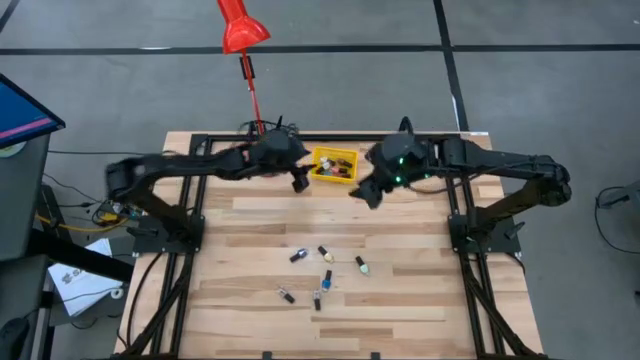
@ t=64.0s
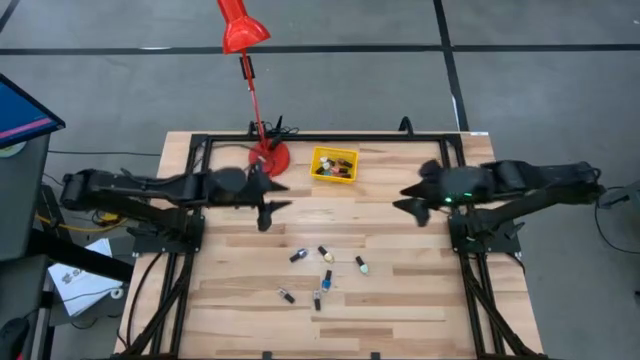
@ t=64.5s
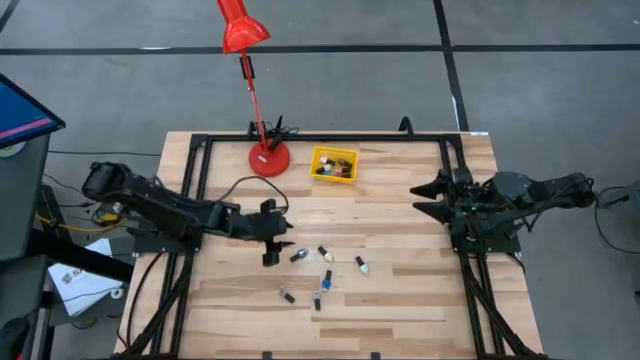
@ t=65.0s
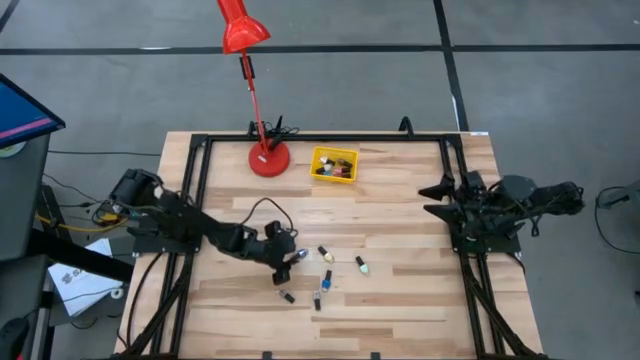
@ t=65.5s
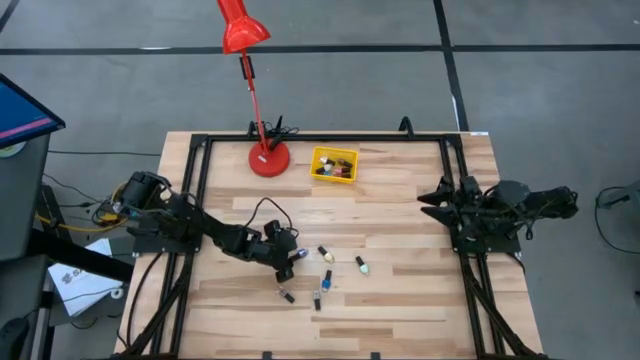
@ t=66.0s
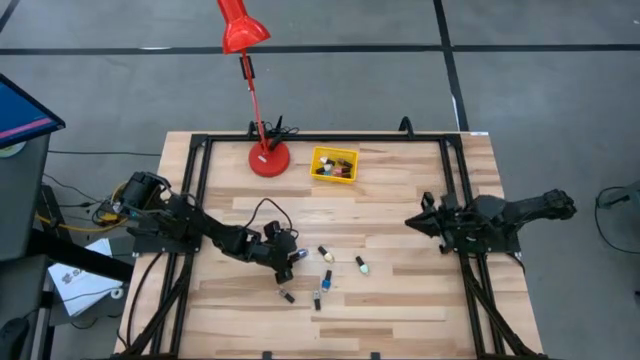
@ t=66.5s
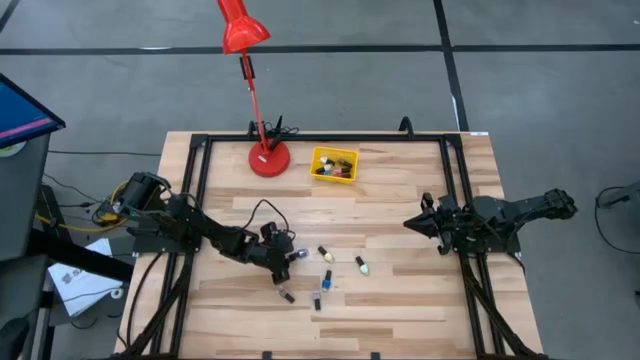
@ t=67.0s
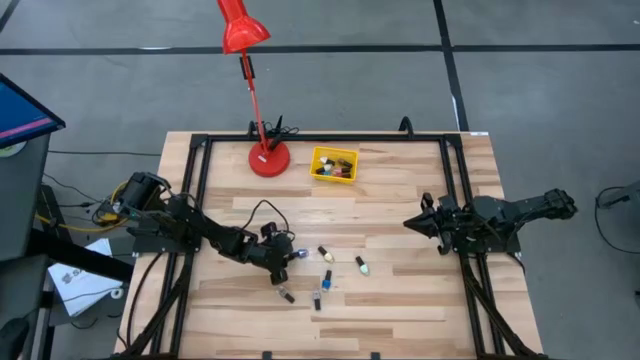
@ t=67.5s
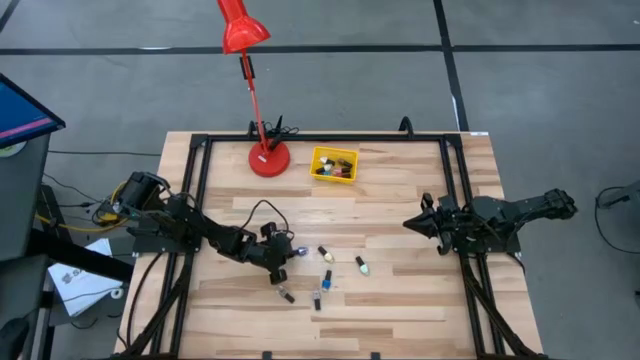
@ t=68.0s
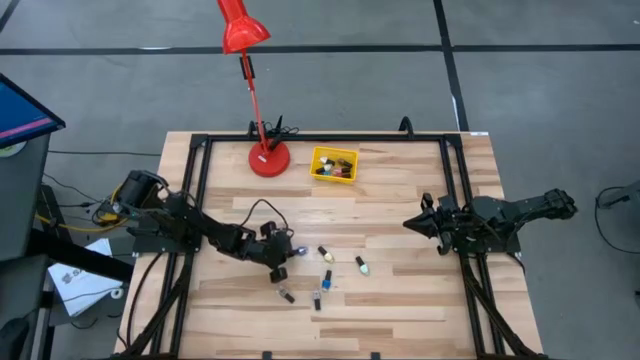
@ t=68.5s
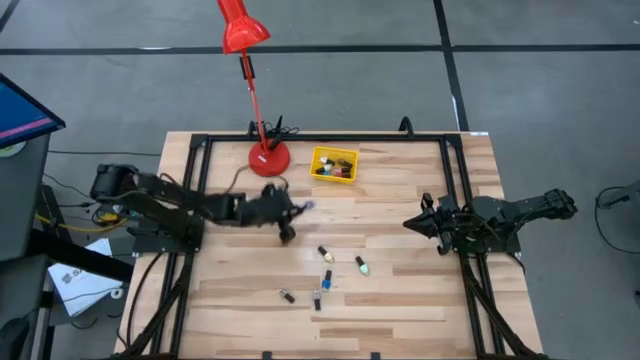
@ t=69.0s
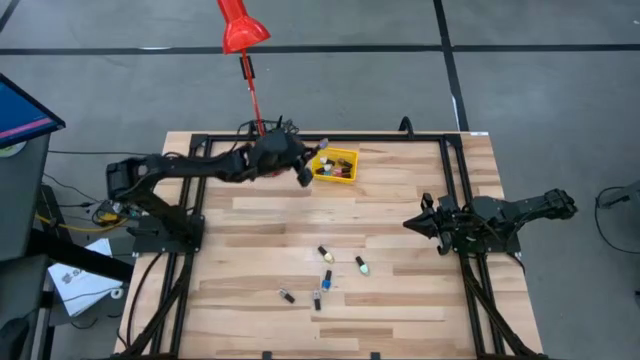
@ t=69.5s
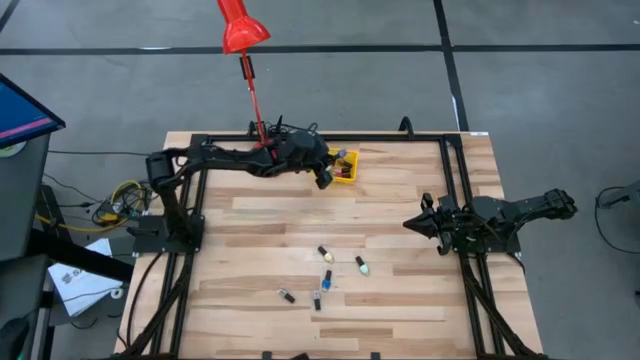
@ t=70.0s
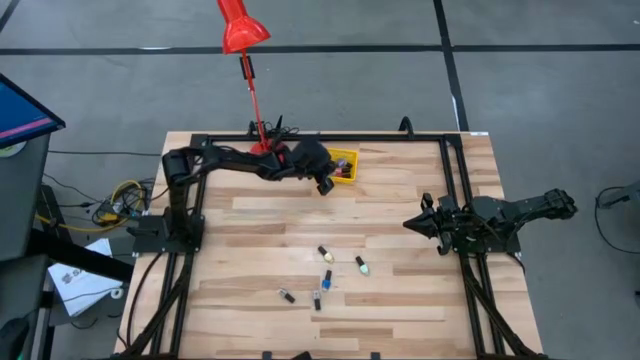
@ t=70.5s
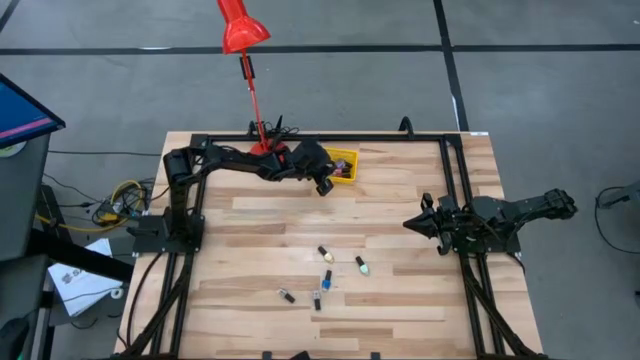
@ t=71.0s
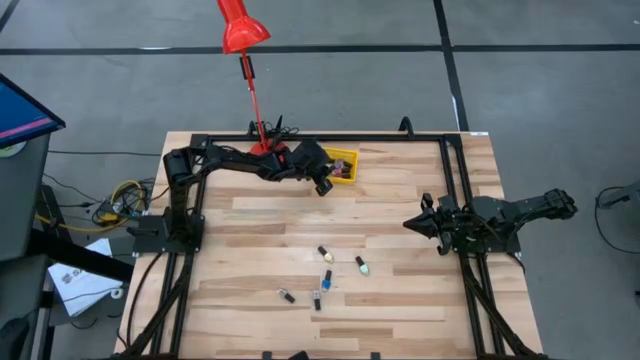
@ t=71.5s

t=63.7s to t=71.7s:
Task: Pick & Place Nail Polish
Put the purple nail polish bottle into the yellow bin

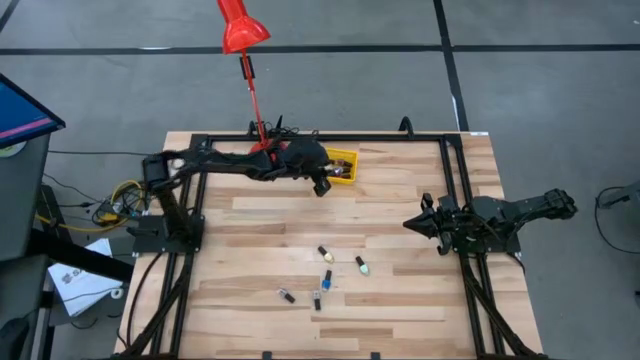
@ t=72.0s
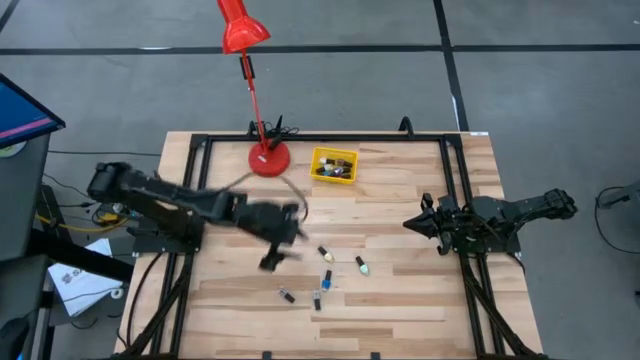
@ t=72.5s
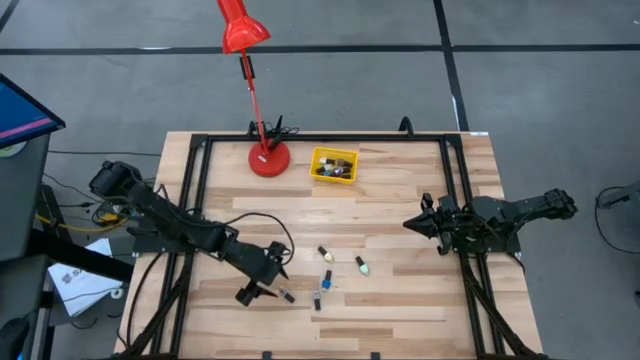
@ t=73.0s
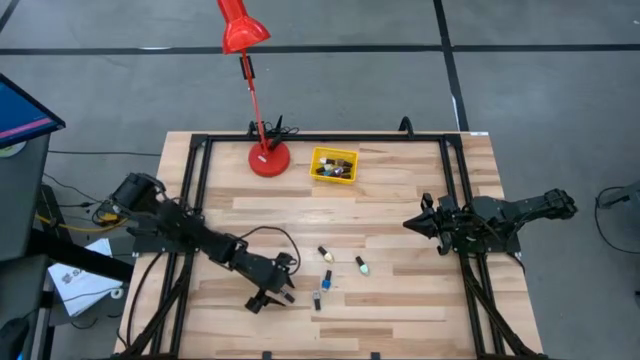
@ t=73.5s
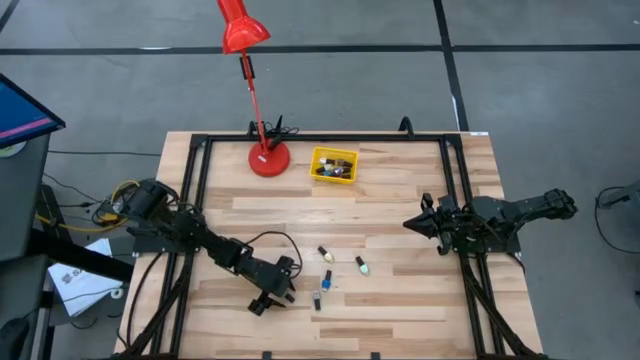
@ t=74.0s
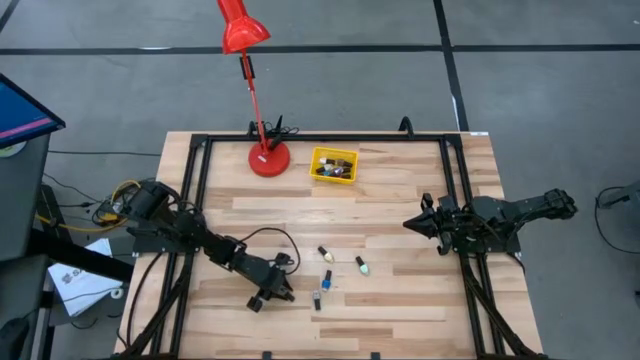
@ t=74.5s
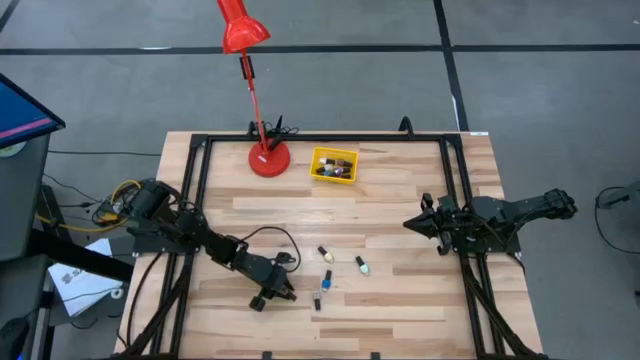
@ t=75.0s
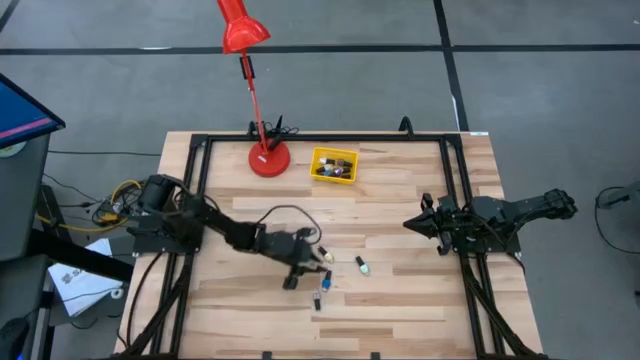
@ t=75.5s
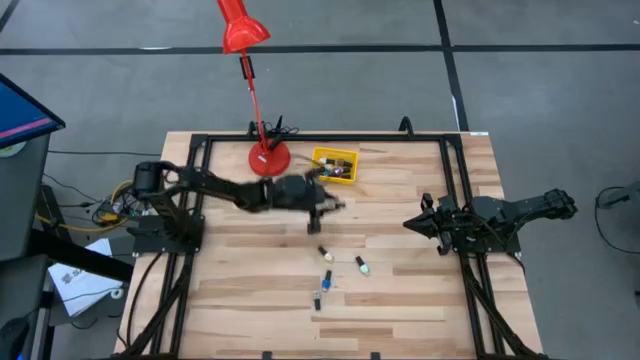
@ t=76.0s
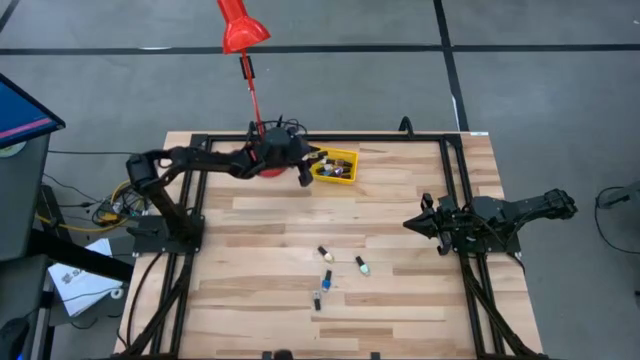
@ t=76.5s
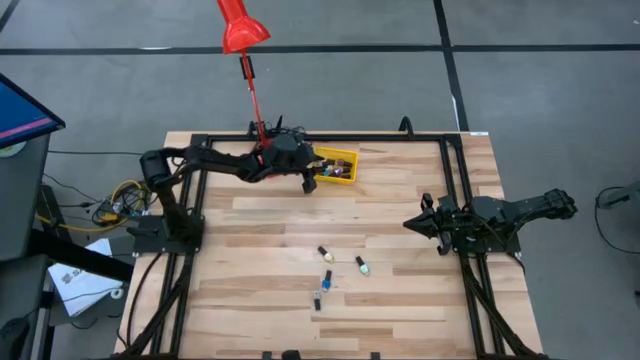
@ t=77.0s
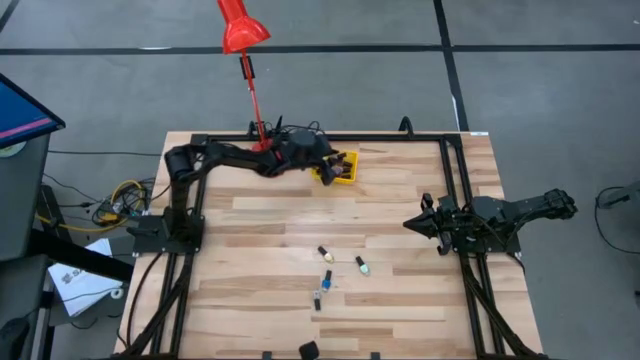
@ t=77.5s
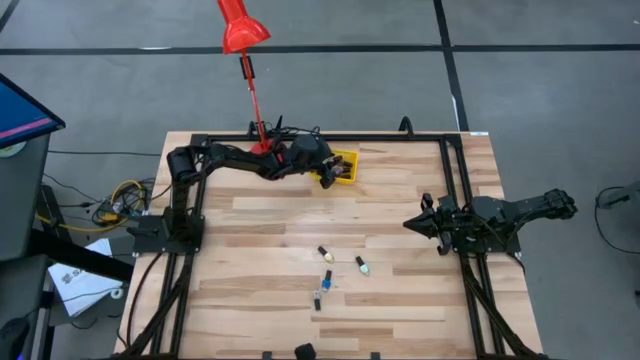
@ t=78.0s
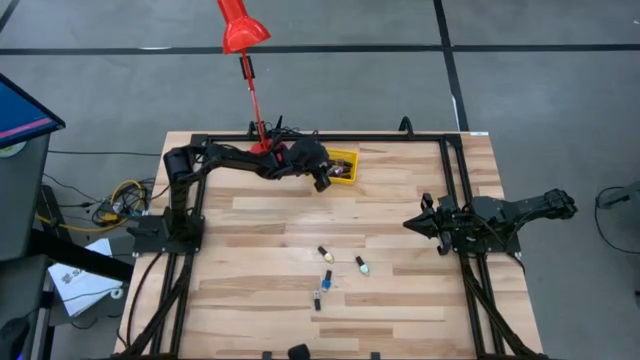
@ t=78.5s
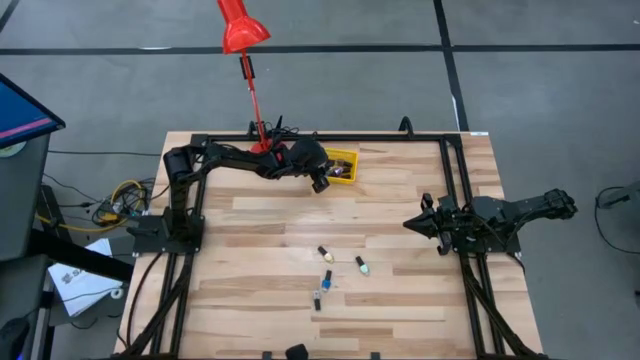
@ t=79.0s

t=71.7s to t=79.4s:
Put the left transparent nail polish bottle into the yellow bin

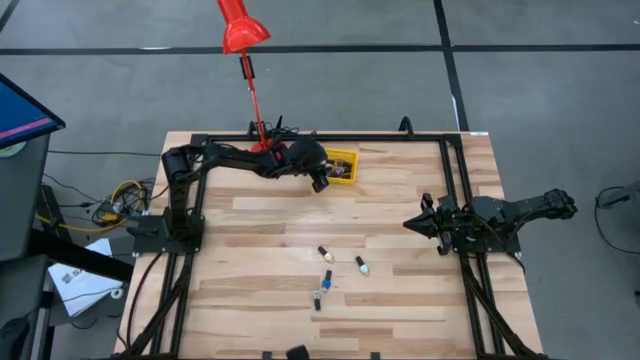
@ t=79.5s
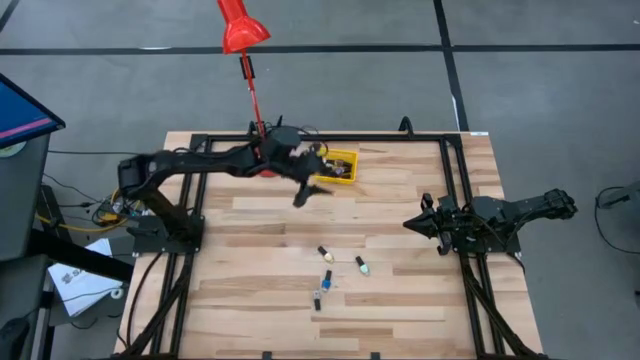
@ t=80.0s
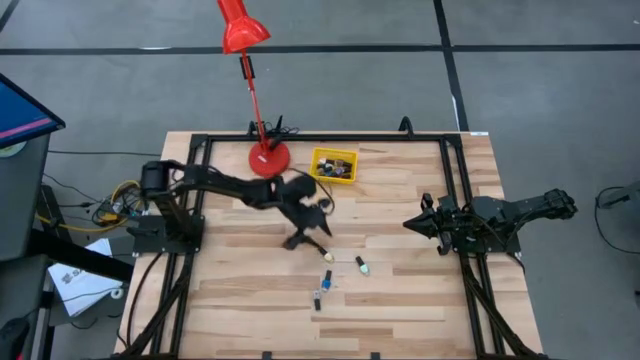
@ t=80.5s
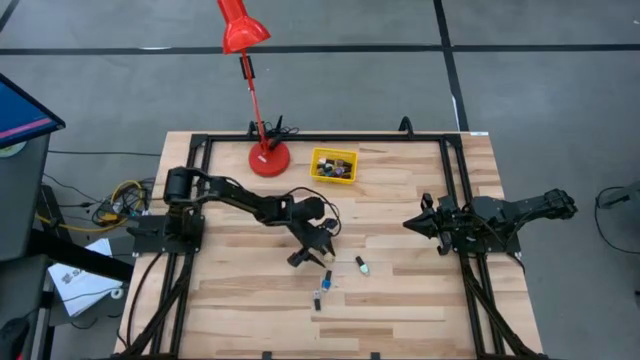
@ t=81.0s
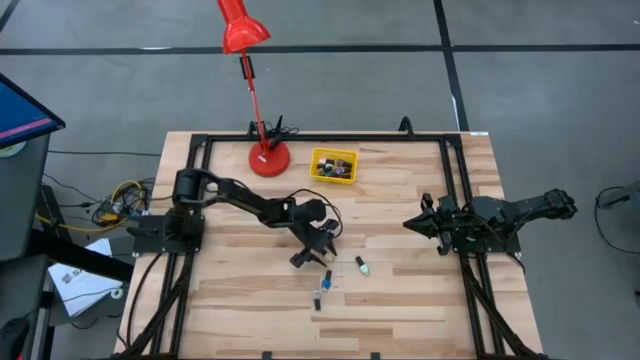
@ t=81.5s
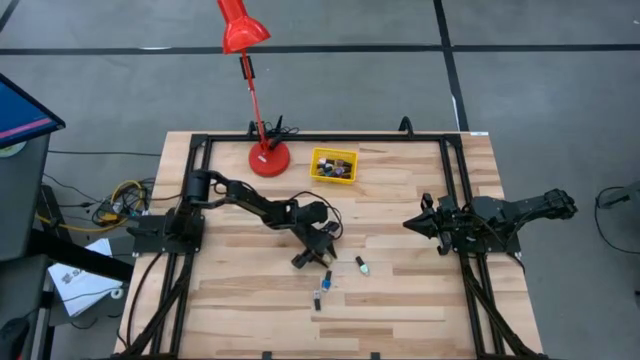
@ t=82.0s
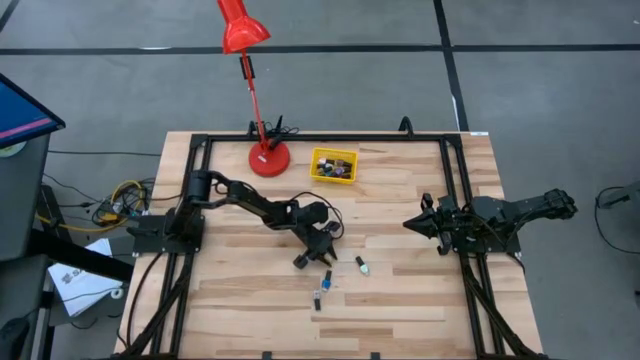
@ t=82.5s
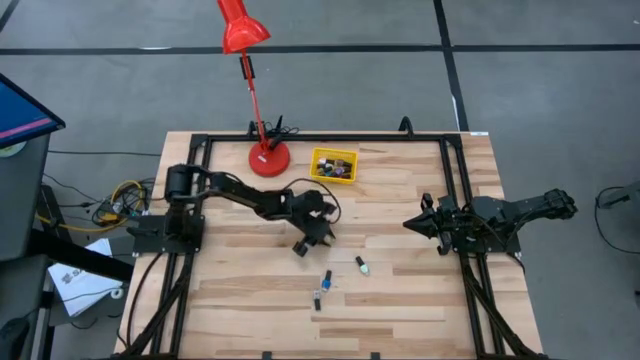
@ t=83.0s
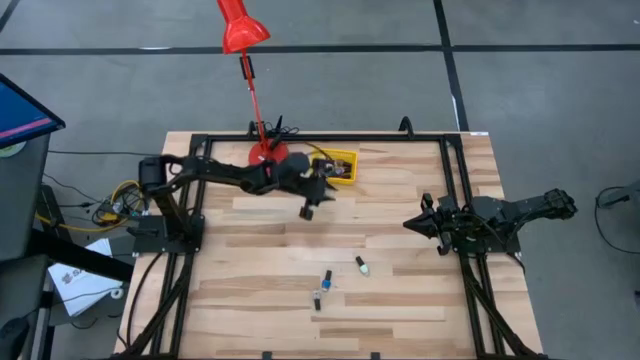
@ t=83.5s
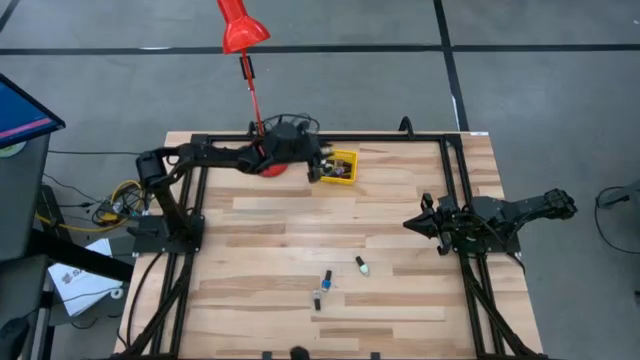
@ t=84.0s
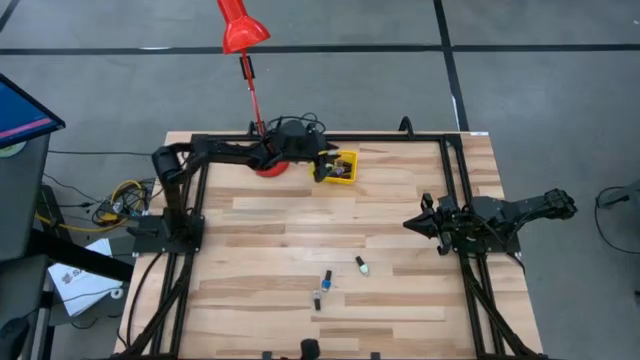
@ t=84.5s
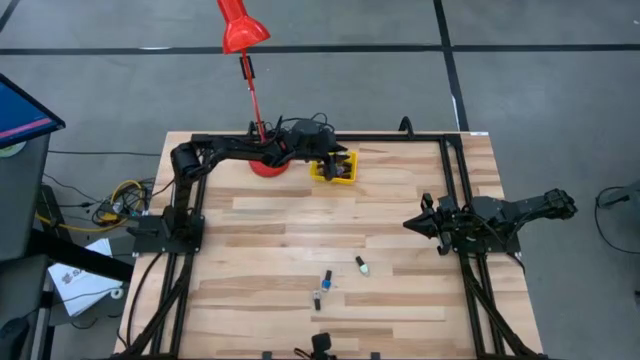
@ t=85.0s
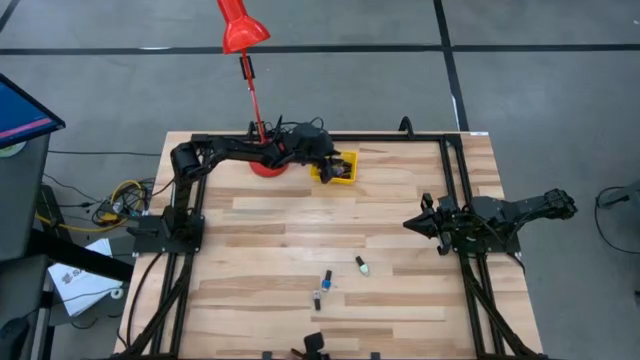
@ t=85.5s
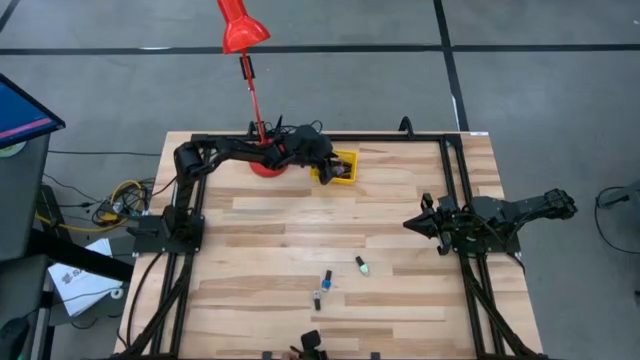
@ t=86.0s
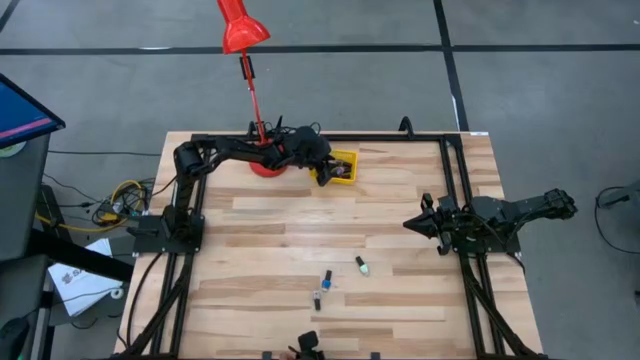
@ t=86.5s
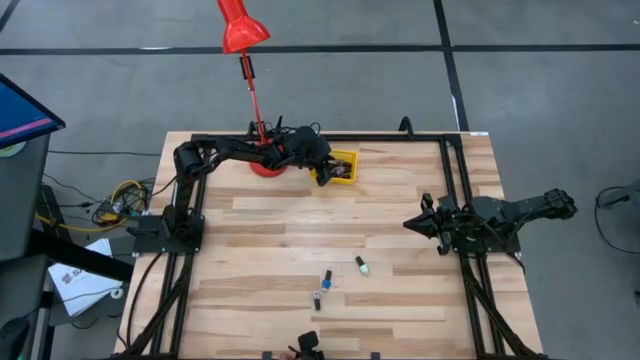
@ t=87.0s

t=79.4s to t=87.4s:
Put the light yellow nail polish bottle into the yellow bin
